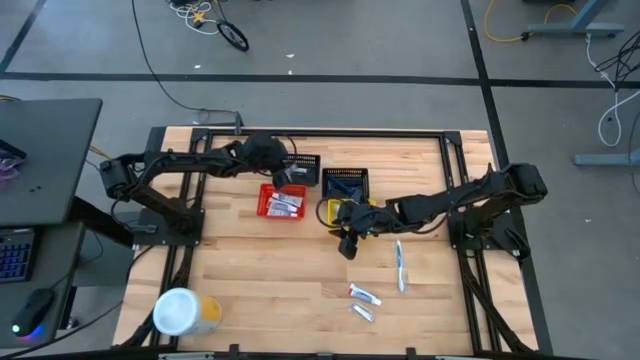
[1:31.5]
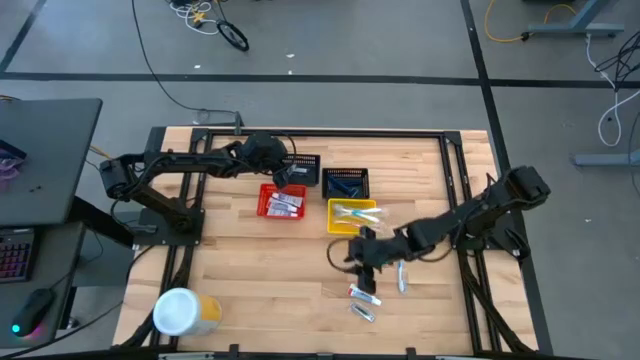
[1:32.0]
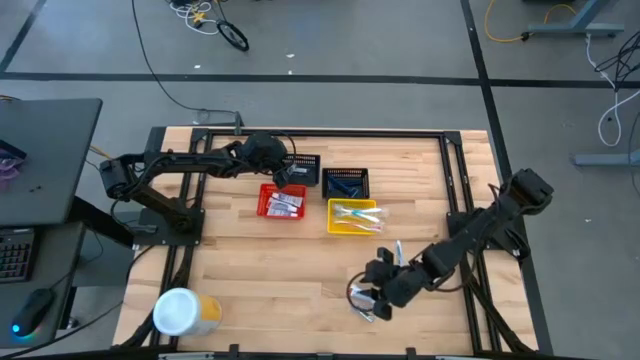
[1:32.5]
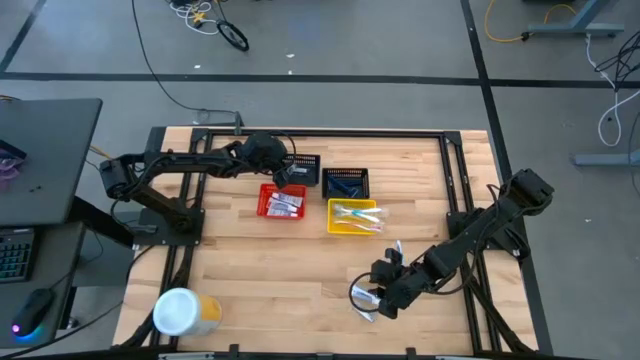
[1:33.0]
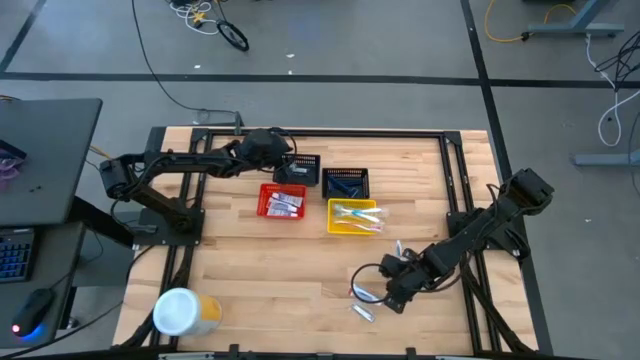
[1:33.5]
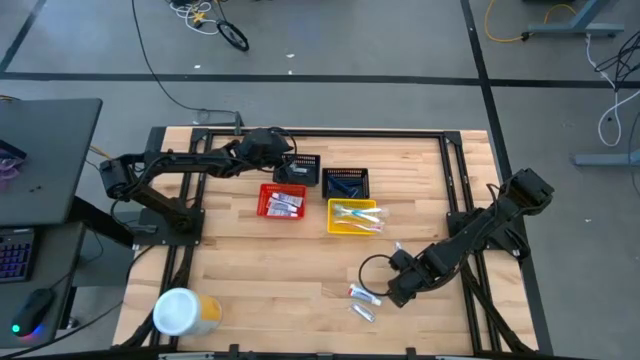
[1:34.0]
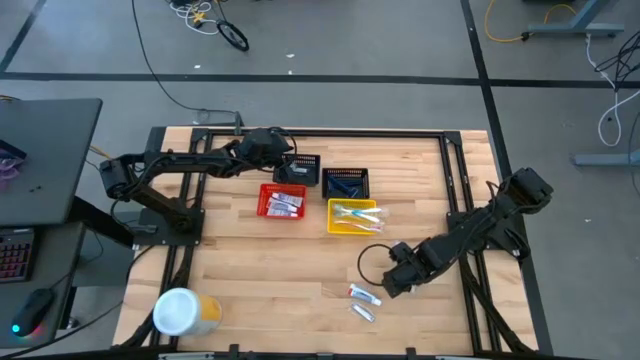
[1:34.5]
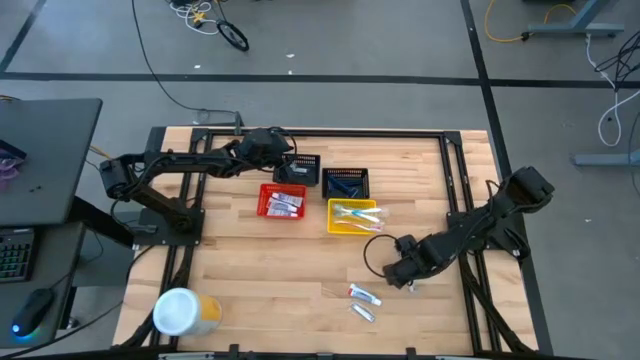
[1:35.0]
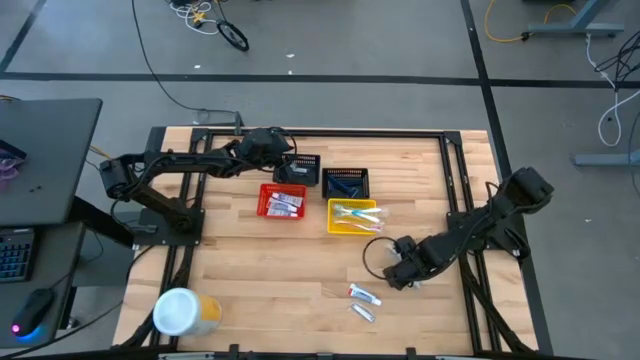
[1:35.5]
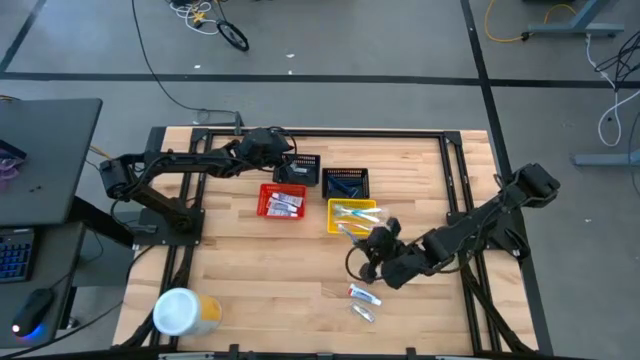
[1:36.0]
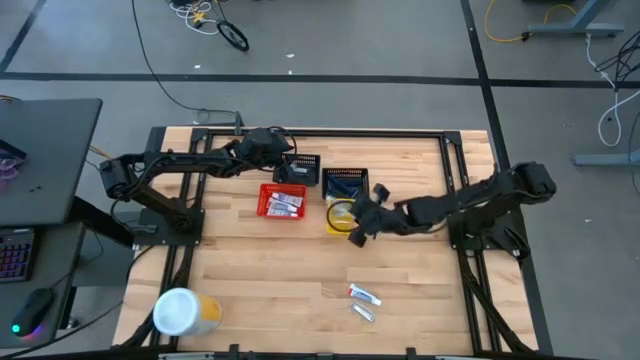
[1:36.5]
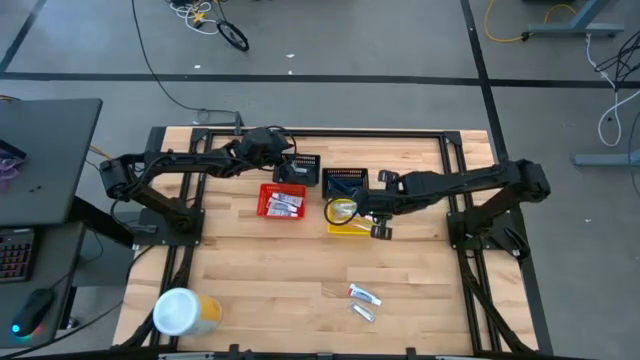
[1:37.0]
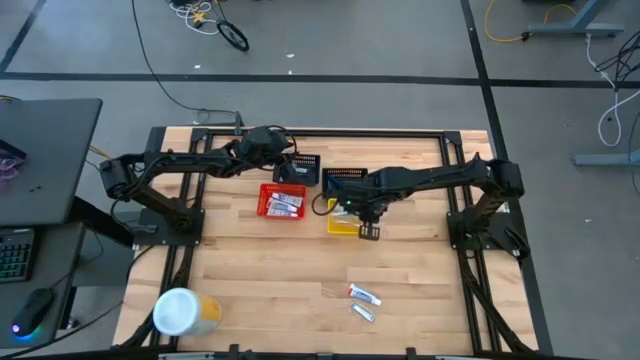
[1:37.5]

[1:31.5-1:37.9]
Task: Pick & Place Travel size toiletries
Put the blue toothbrush into the yellow bin

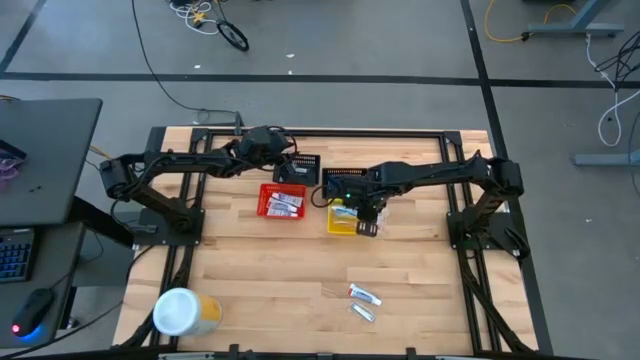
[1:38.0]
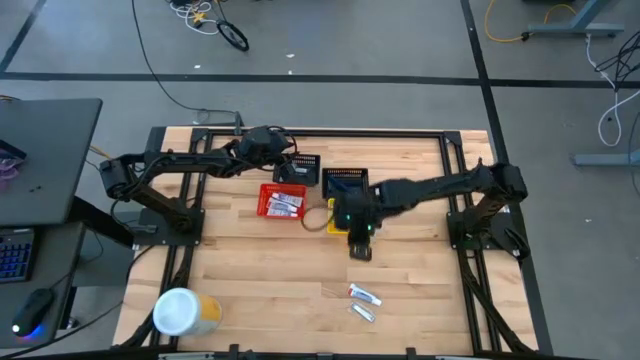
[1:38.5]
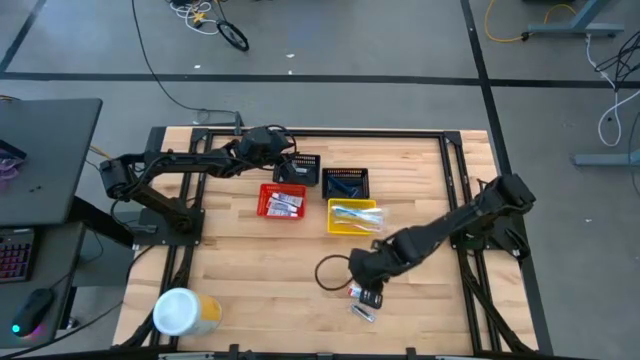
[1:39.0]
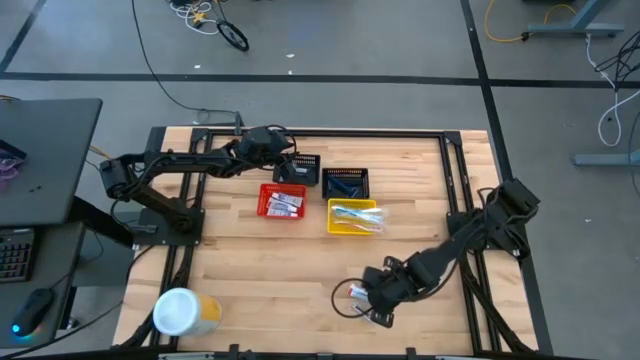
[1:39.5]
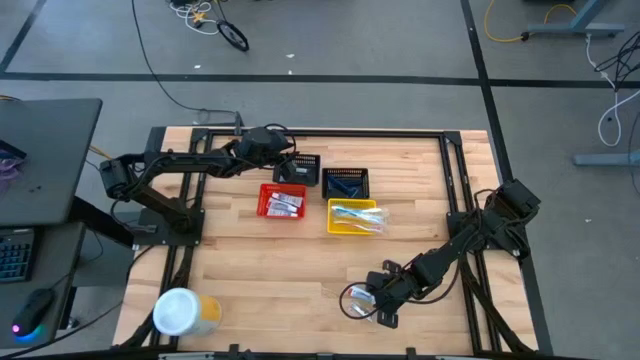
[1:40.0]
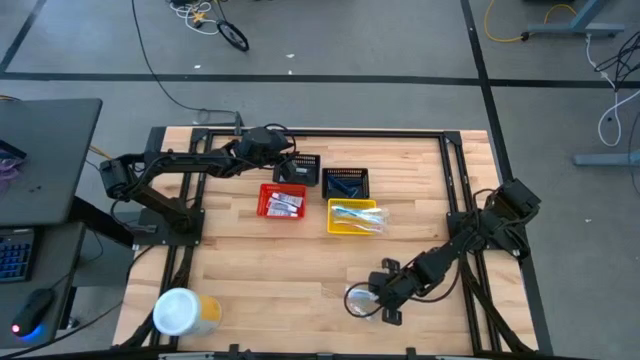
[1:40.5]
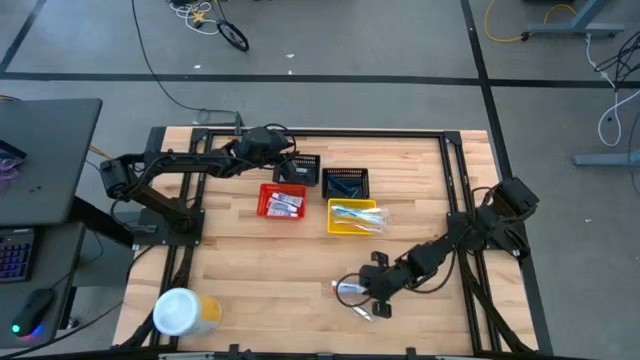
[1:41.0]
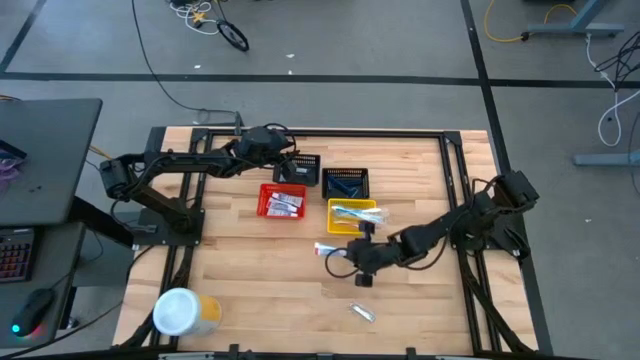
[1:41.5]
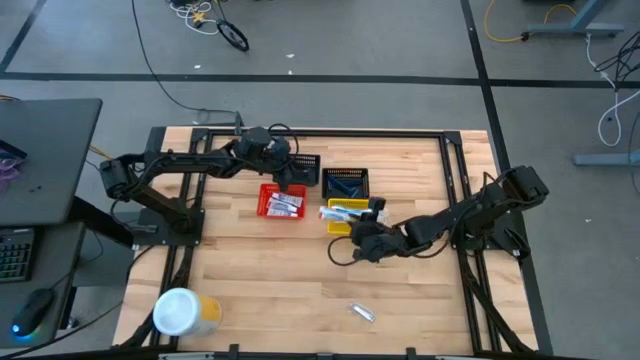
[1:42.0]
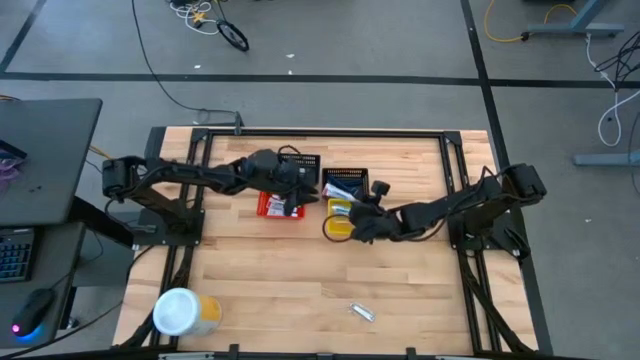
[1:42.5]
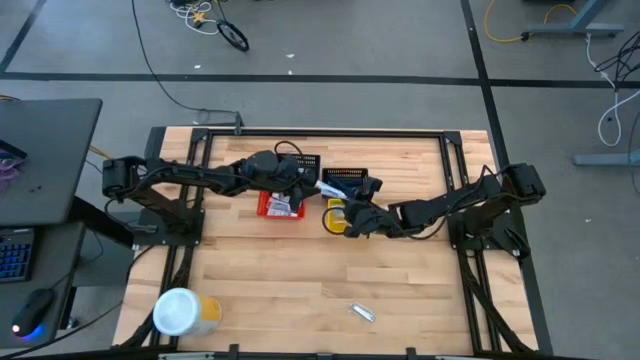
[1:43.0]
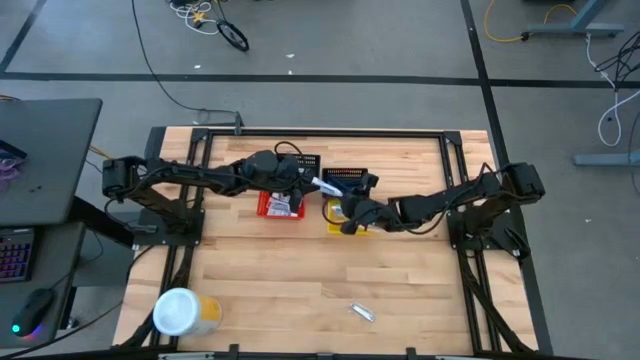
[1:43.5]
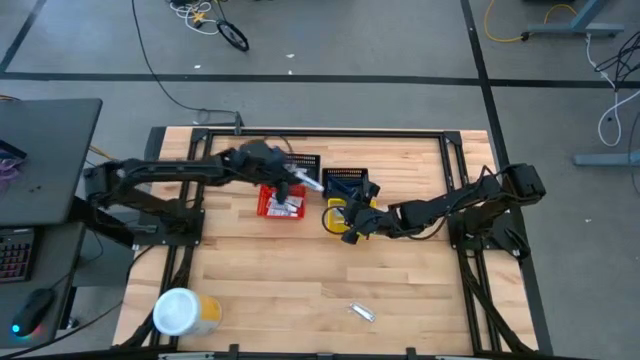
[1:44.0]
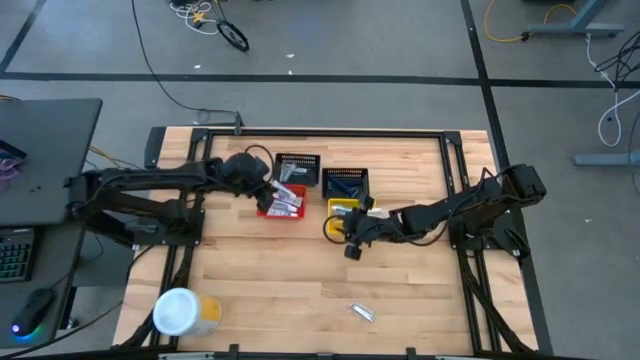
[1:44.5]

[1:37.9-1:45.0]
Put the white toothpaste into the red bin

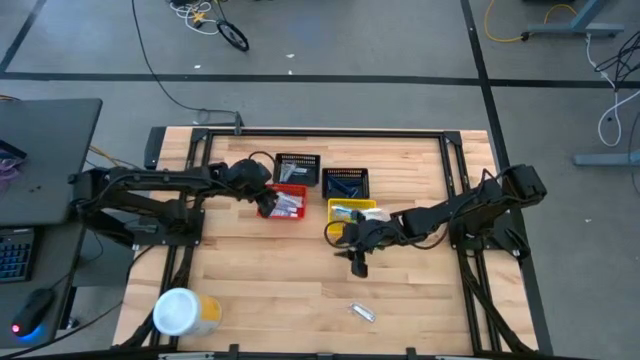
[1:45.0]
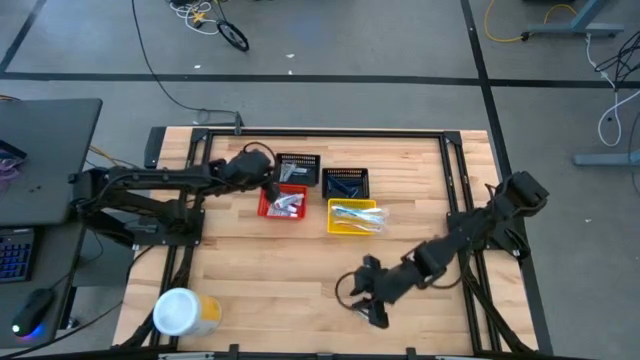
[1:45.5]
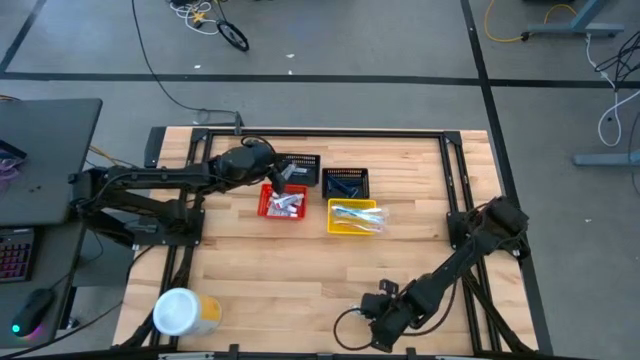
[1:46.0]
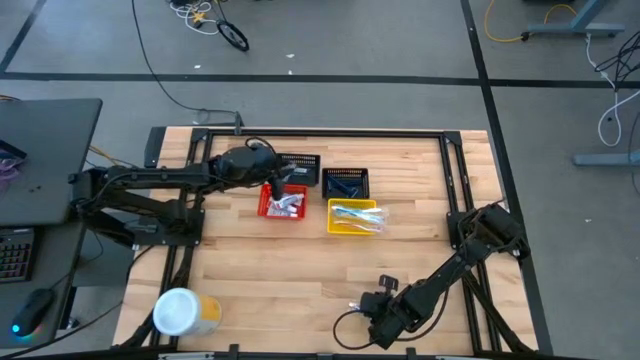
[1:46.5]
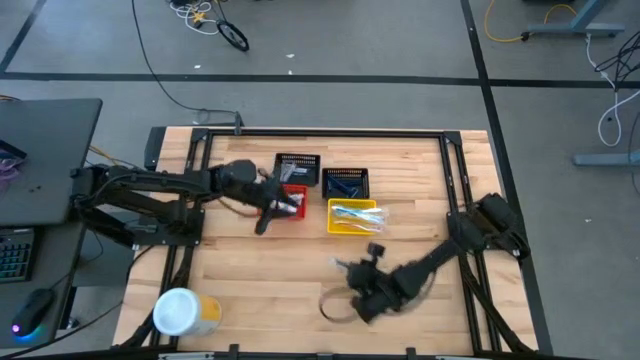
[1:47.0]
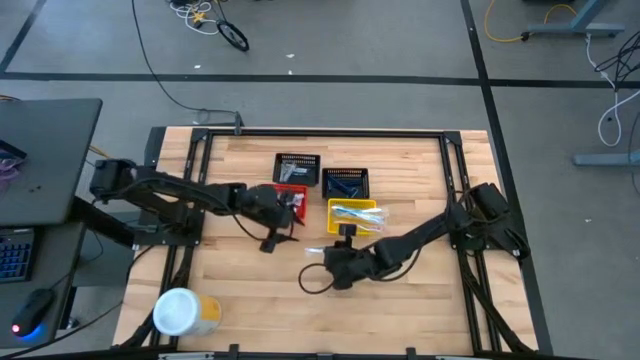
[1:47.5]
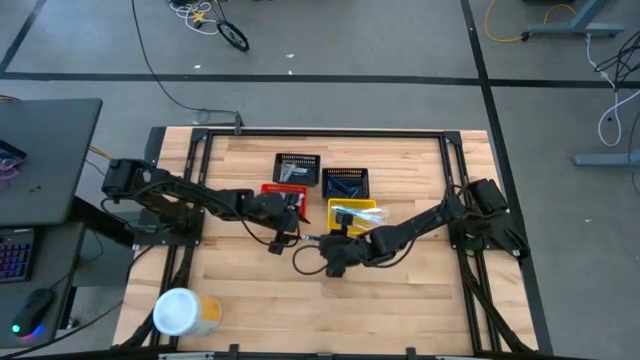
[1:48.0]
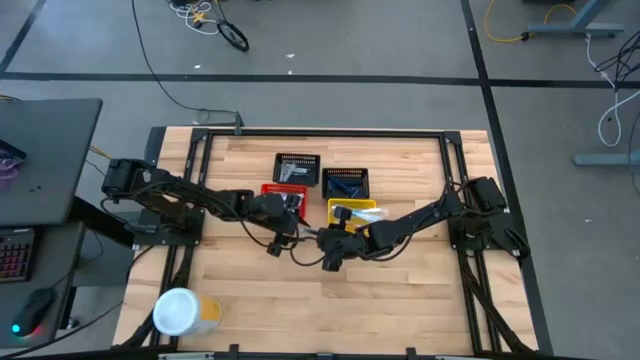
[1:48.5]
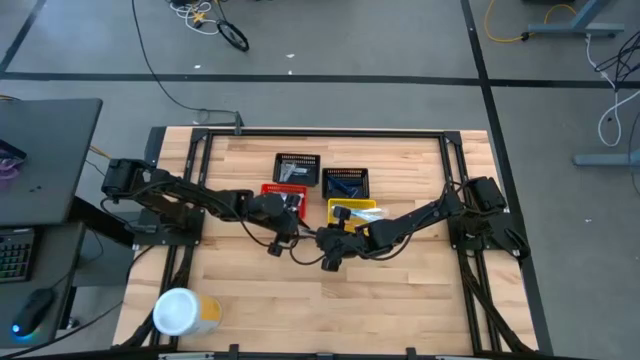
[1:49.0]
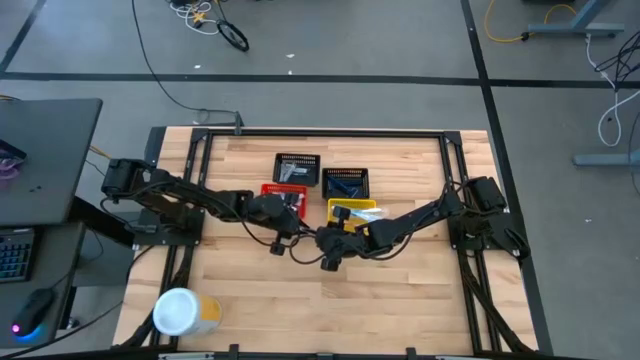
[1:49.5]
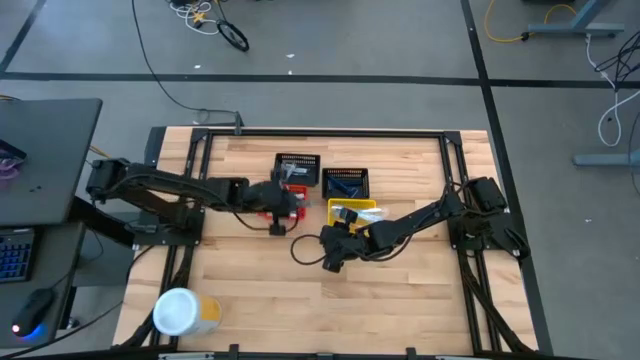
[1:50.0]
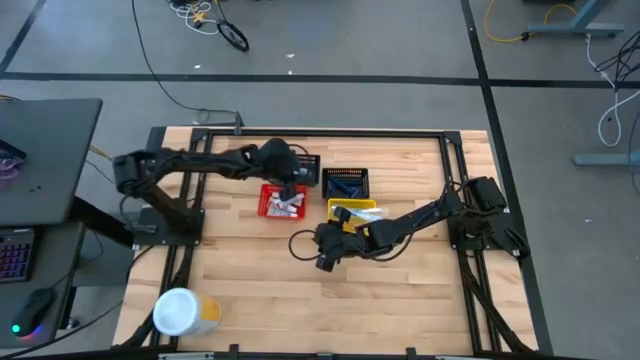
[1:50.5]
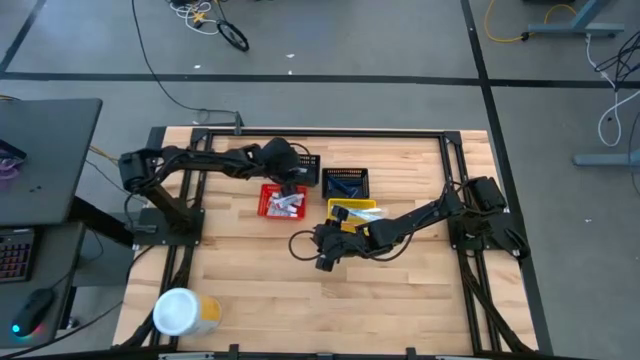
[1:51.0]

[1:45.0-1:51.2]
Put the silver nail cutter into the left black bin

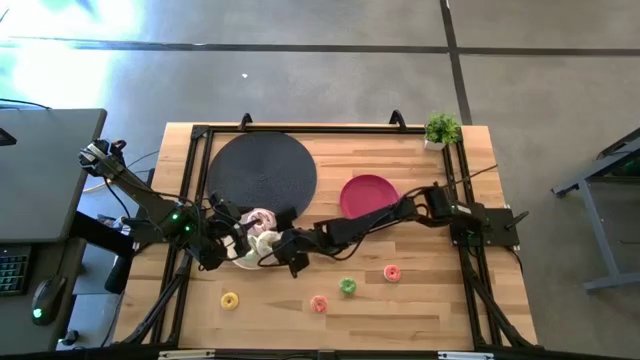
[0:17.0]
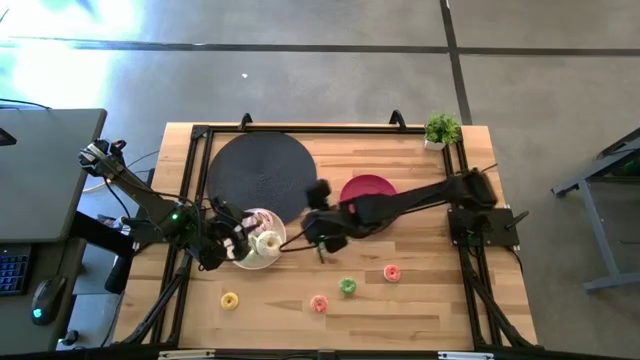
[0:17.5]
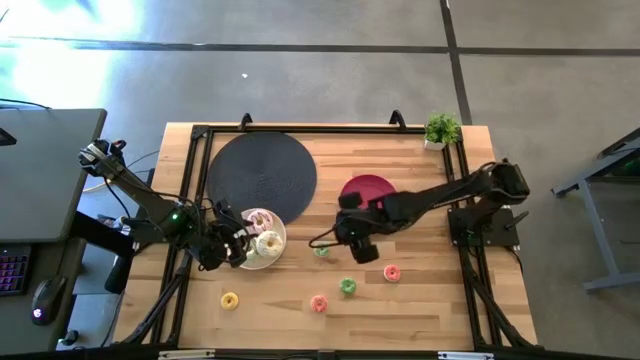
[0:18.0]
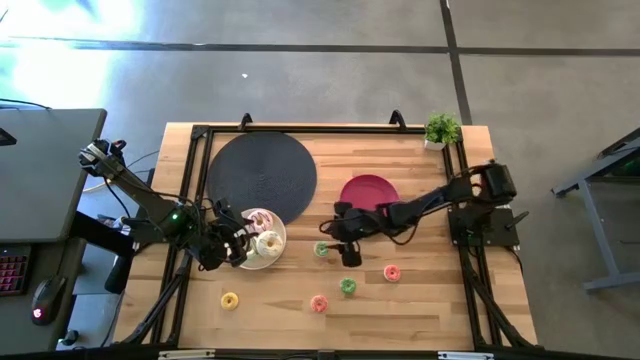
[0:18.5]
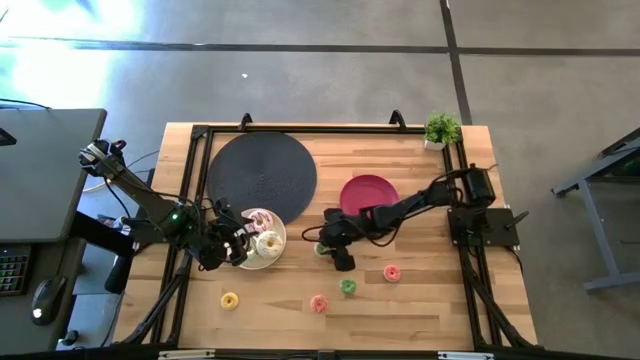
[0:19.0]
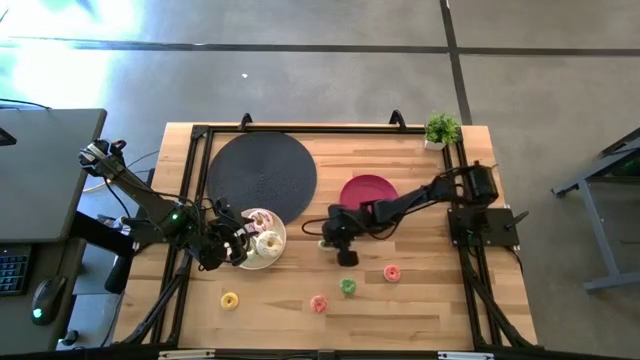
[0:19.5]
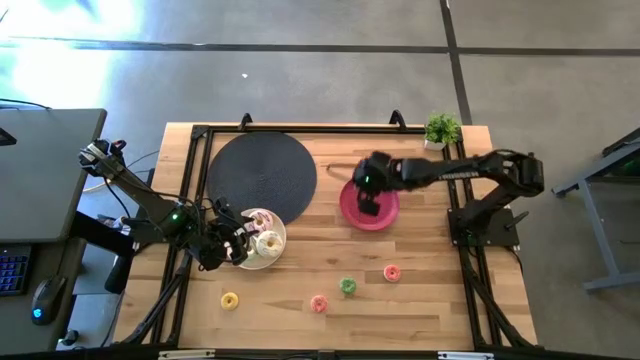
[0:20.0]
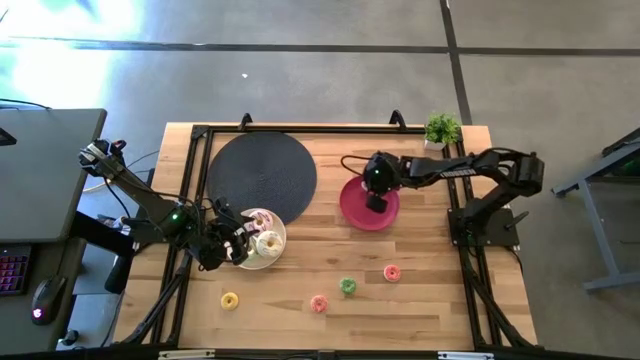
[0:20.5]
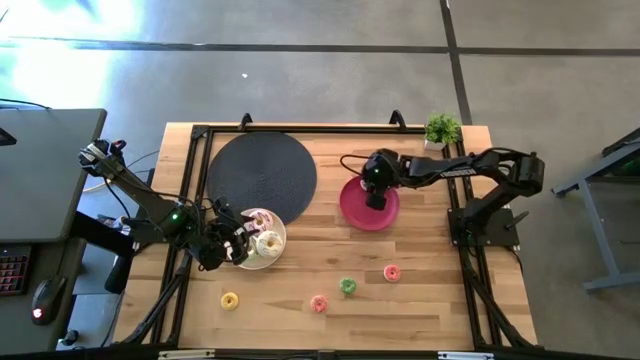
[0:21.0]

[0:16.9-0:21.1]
Task: Pick & Place donuts
Put the top small green donut on the red plate
